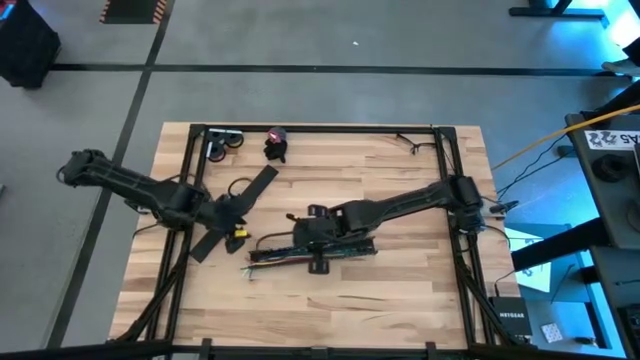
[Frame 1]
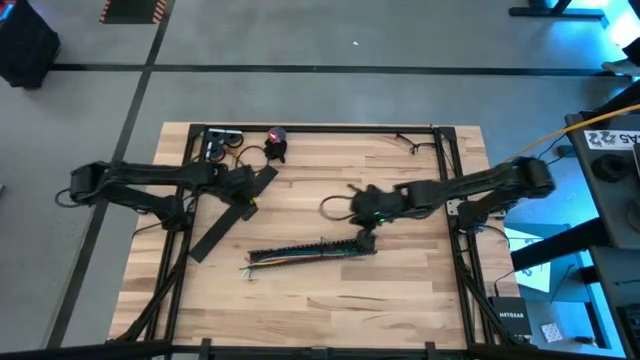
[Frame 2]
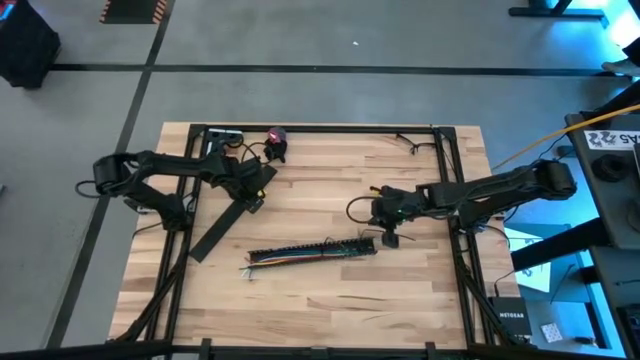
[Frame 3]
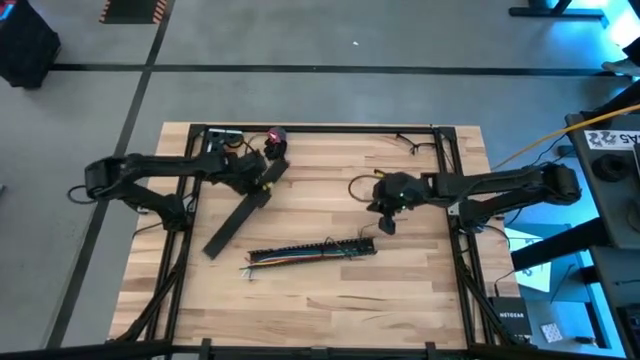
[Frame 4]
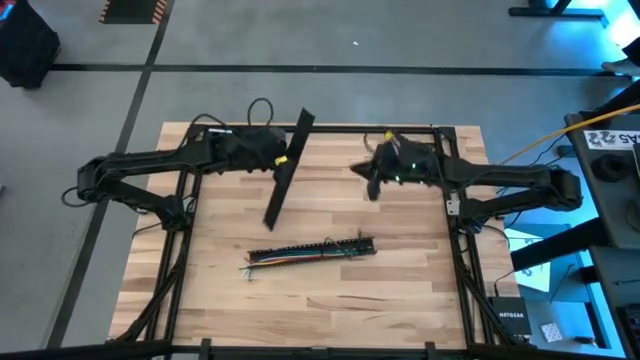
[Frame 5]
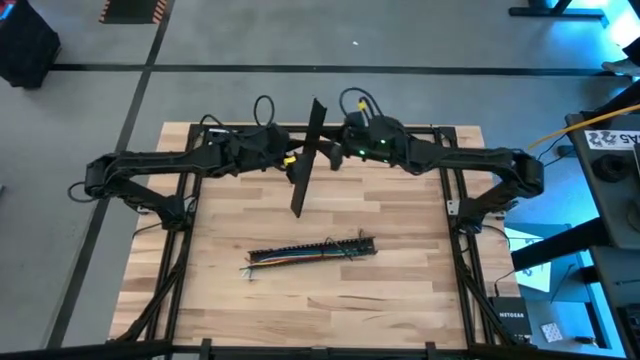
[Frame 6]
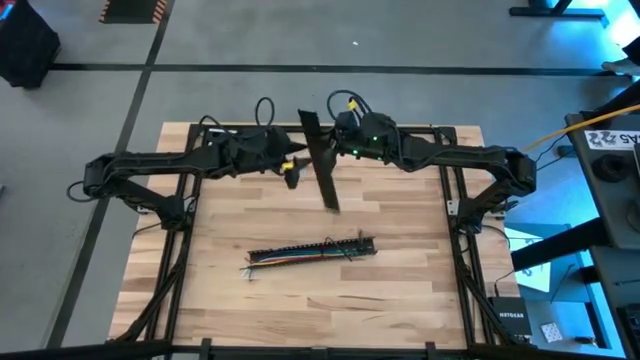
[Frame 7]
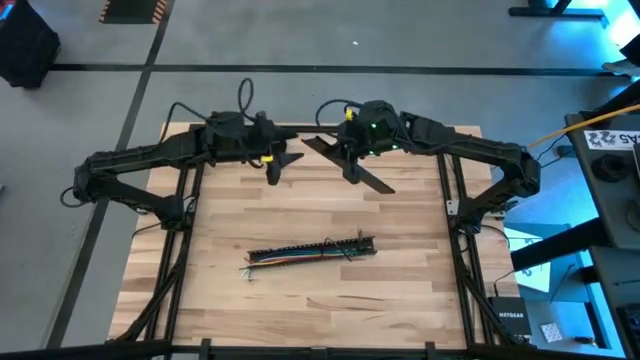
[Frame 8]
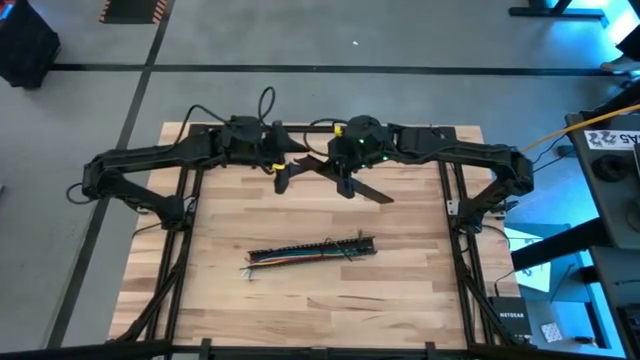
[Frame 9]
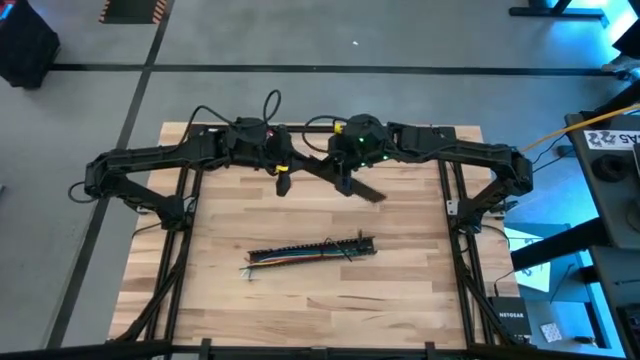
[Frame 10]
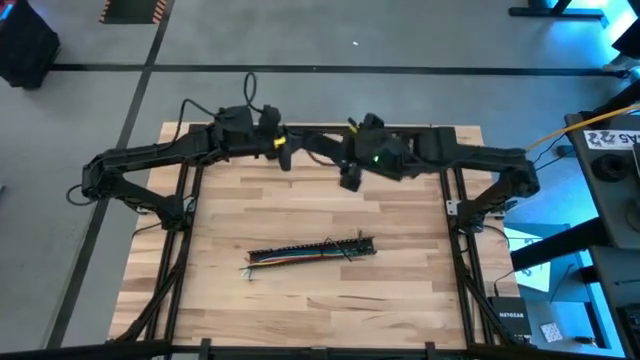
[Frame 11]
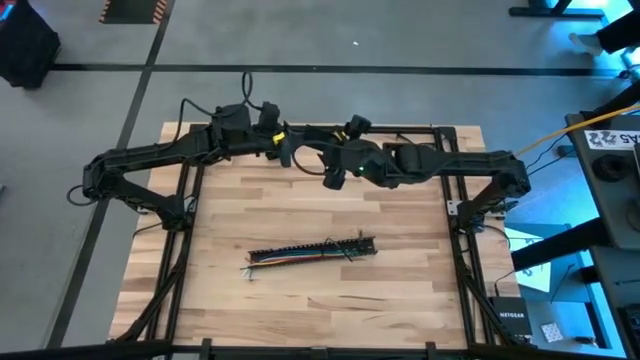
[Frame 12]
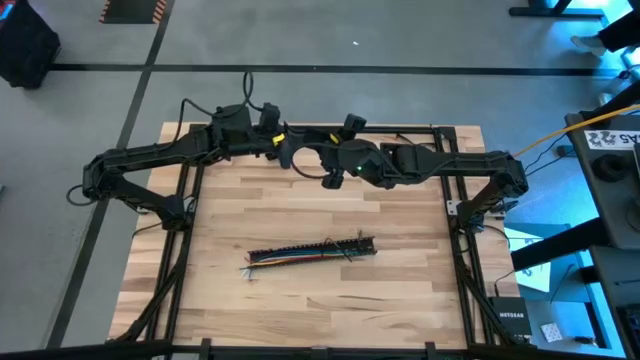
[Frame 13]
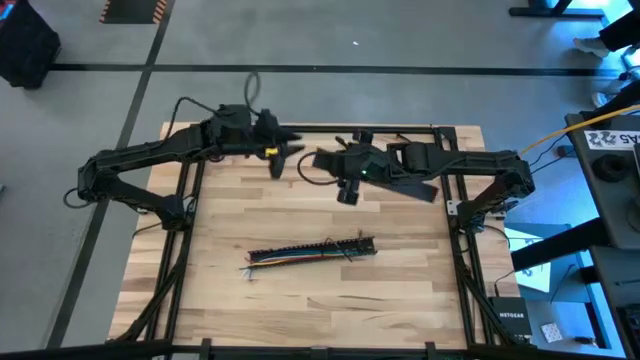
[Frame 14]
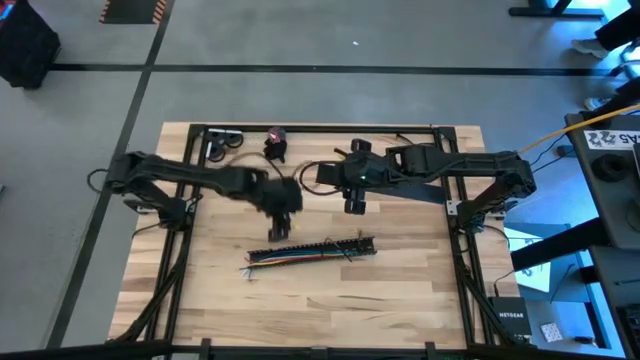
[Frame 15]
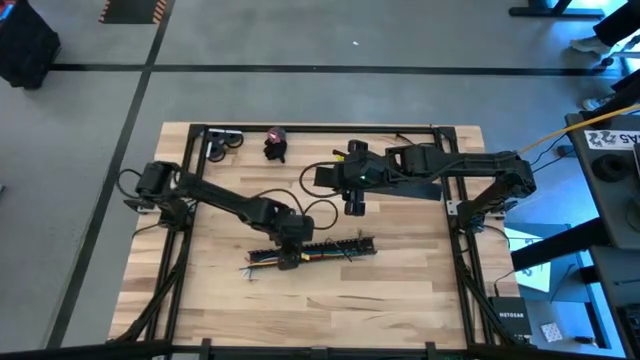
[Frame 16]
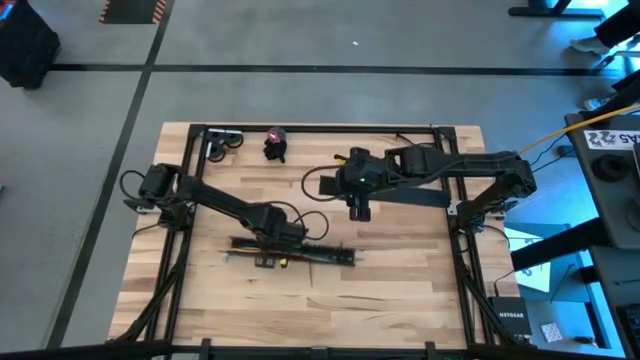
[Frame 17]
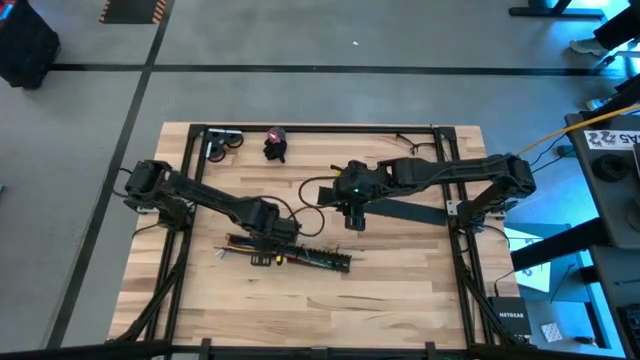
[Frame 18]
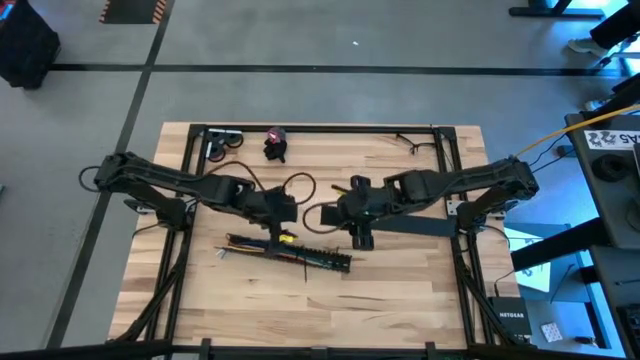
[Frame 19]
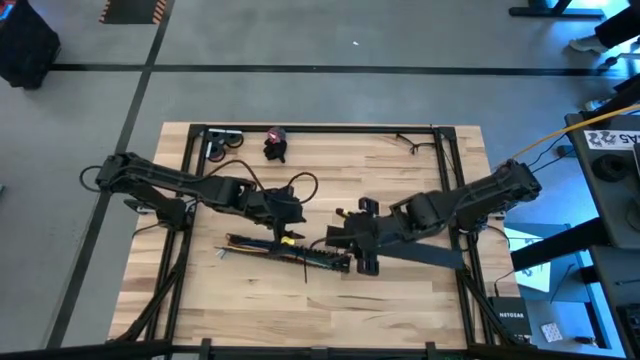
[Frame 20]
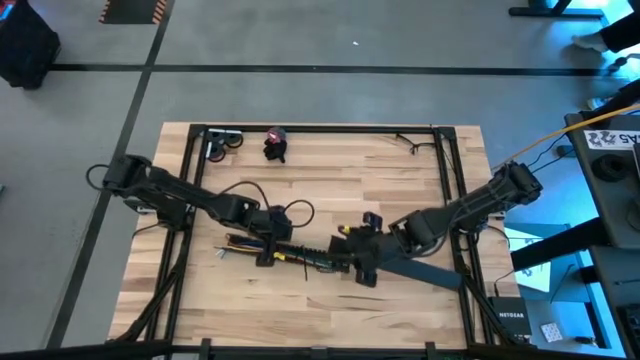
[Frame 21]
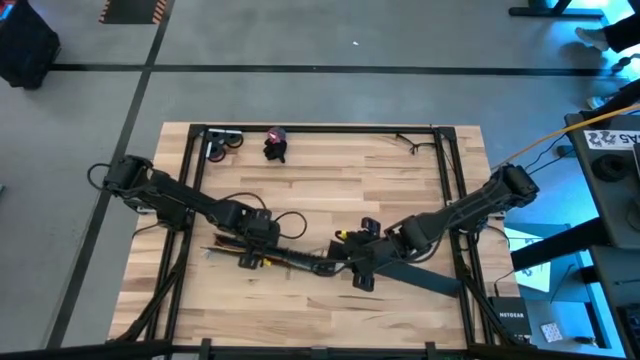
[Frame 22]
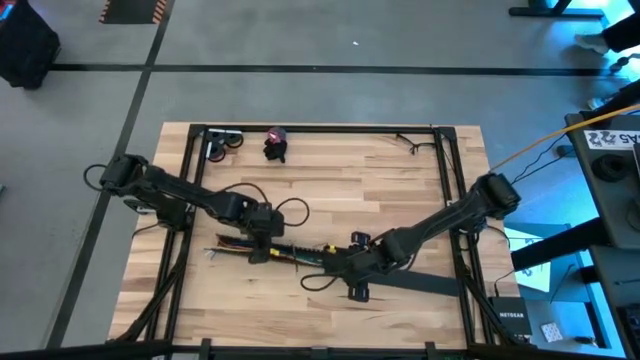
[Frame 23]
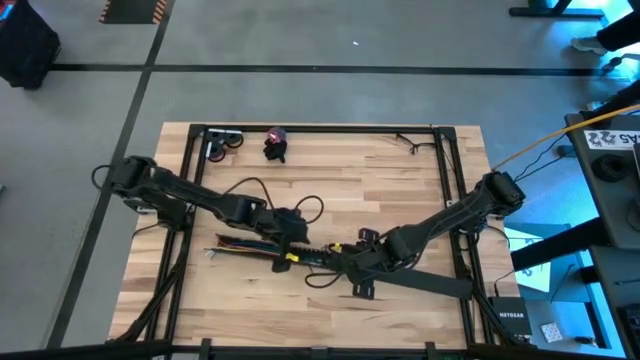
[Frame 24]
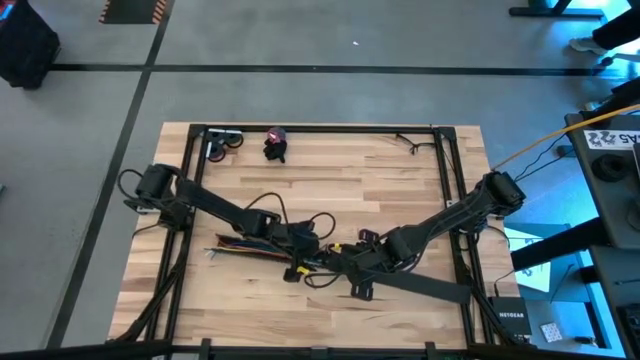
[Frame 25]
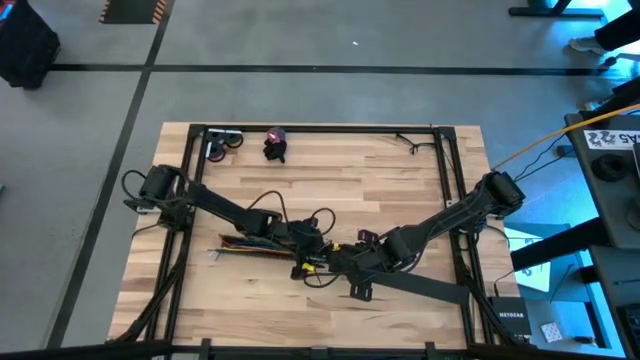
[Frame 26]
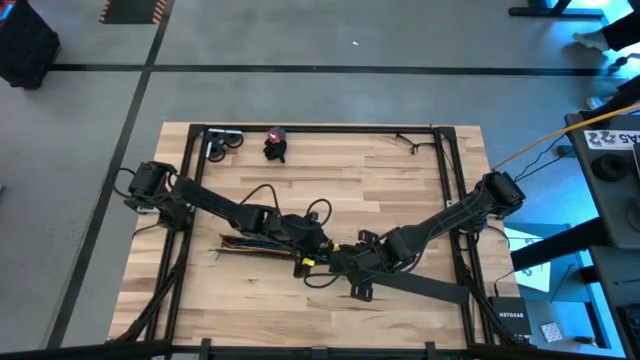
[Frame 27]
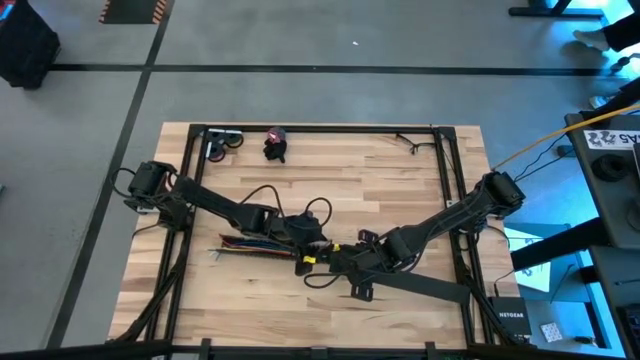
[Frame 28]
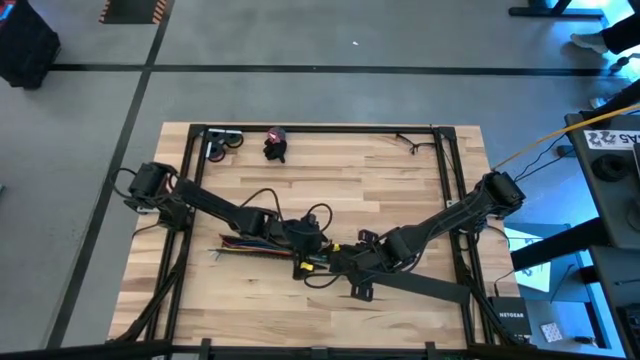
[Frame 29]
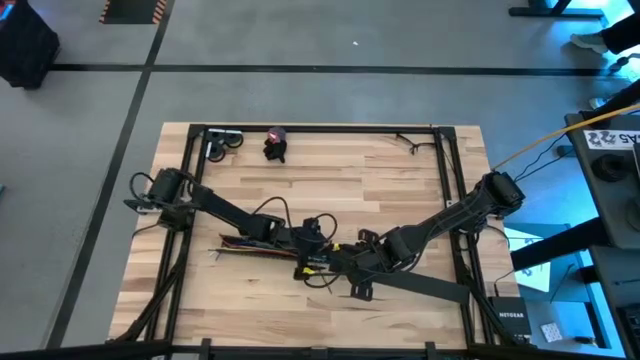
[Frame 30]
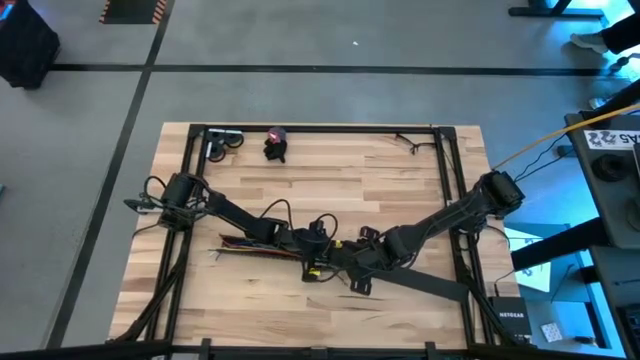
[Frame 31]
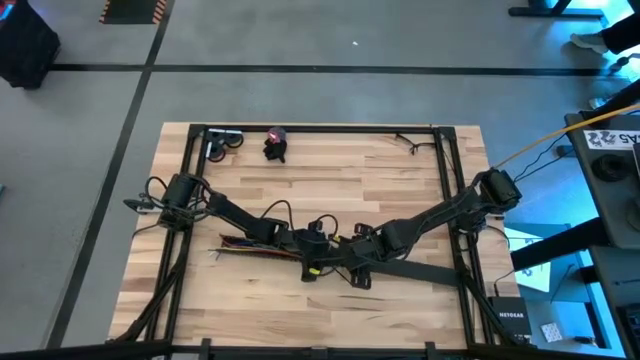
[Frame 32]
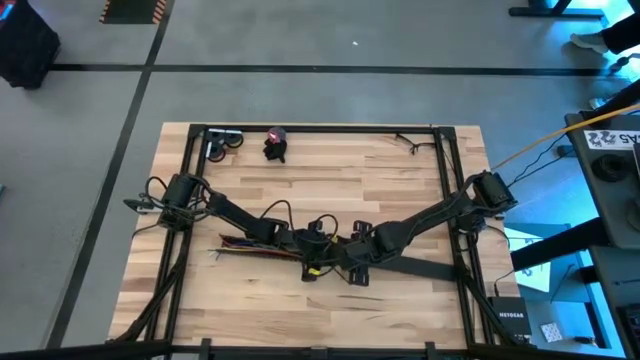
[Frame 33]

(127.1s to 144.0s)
Task: Ziptie cables
Close the black cable duct using the black cable duct lid
